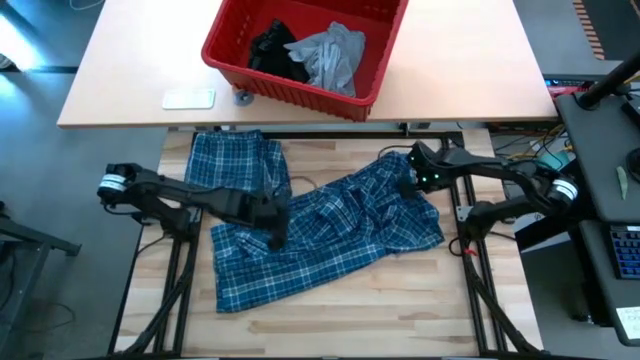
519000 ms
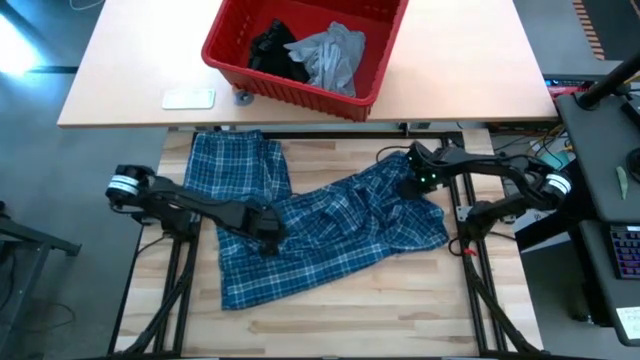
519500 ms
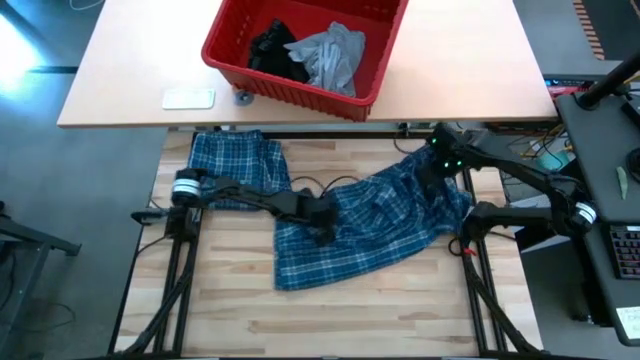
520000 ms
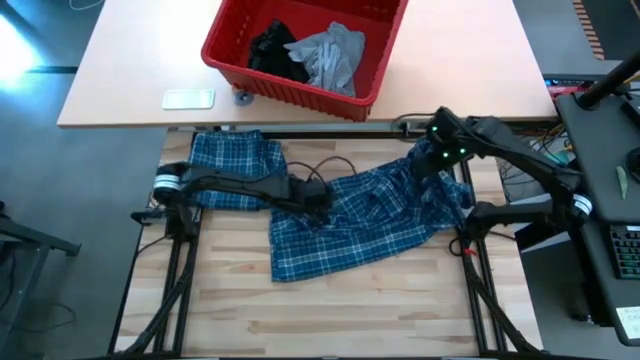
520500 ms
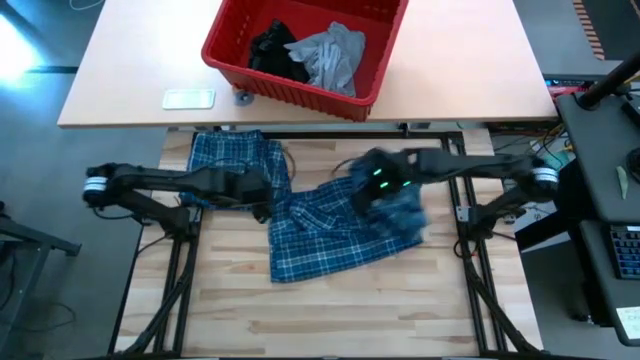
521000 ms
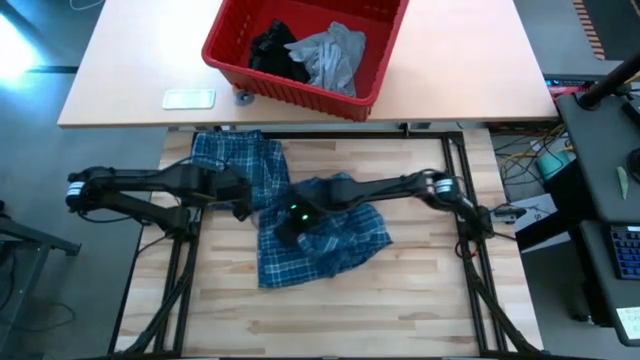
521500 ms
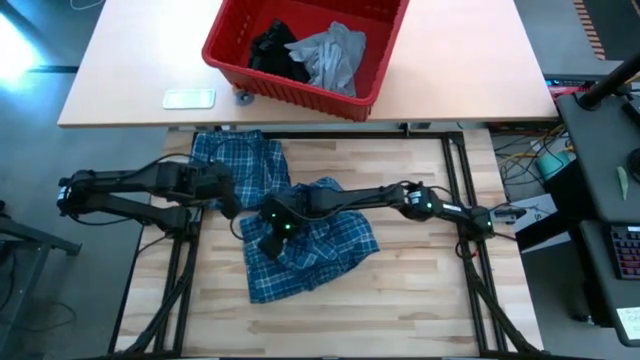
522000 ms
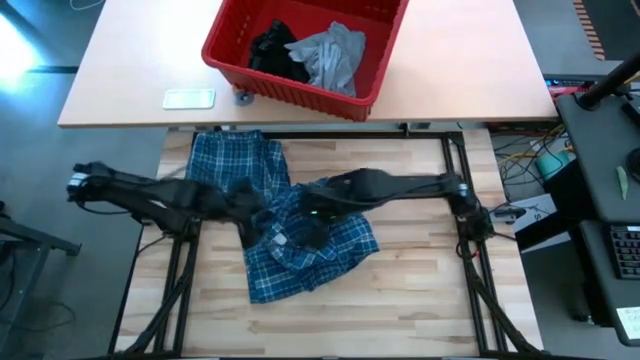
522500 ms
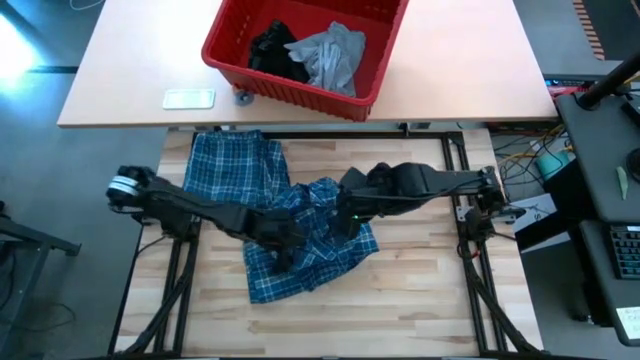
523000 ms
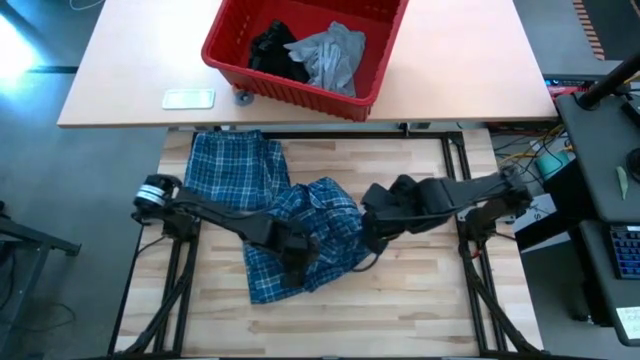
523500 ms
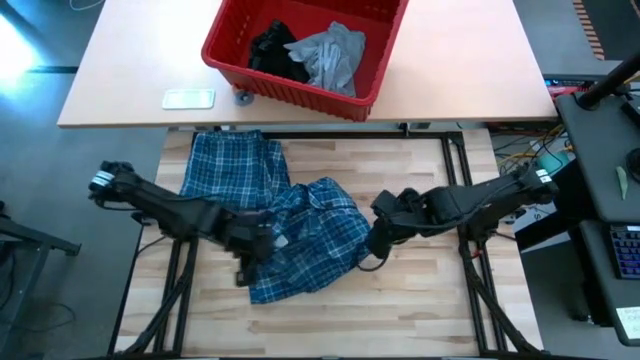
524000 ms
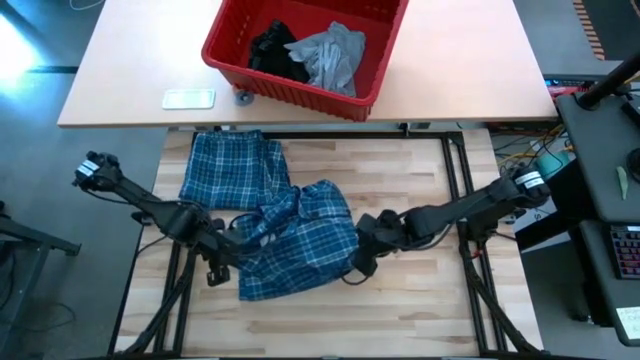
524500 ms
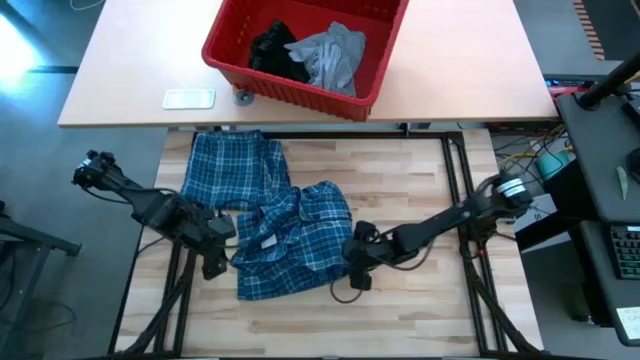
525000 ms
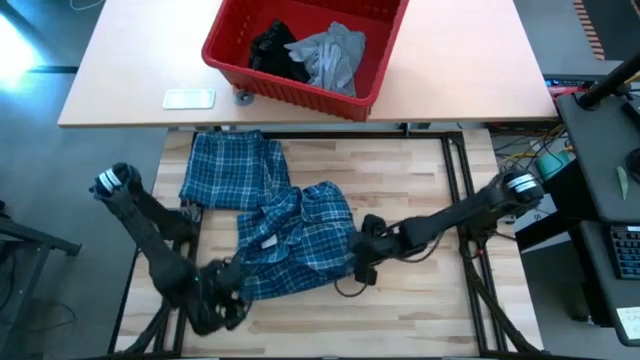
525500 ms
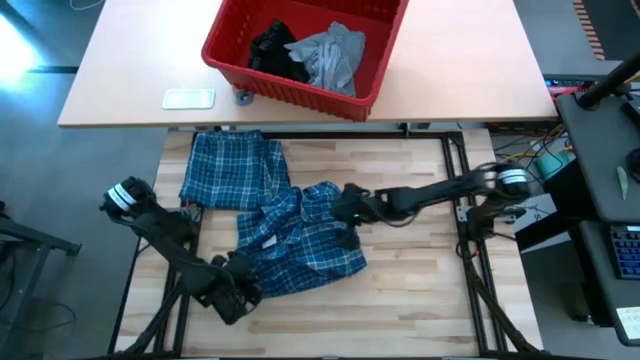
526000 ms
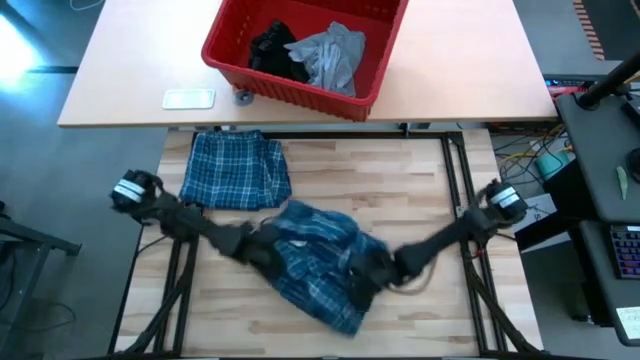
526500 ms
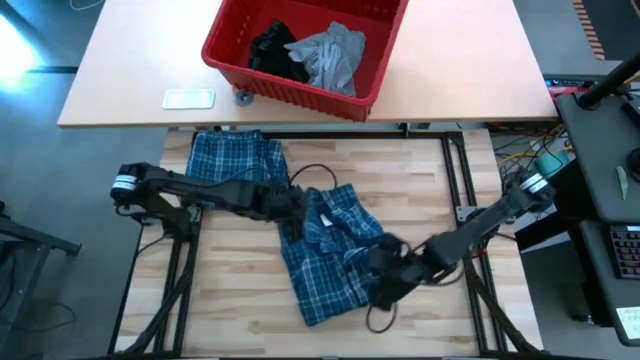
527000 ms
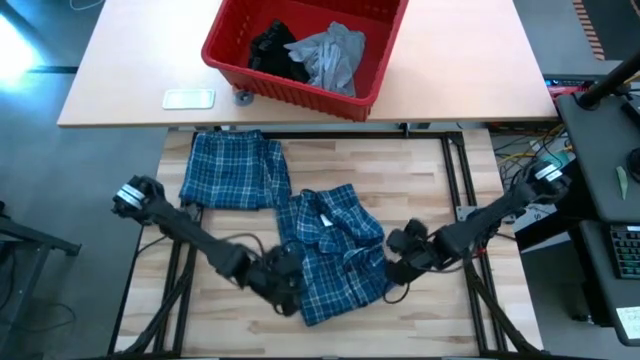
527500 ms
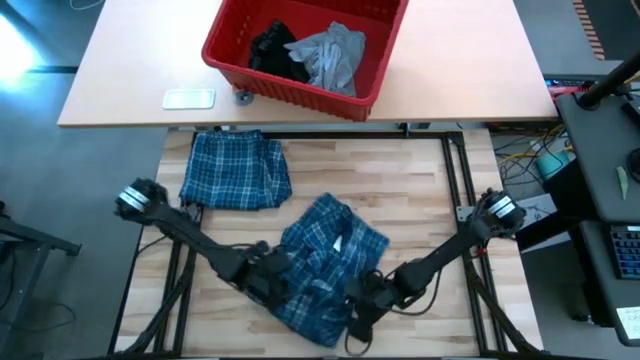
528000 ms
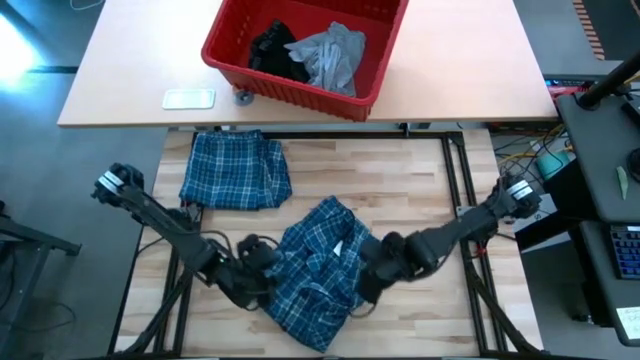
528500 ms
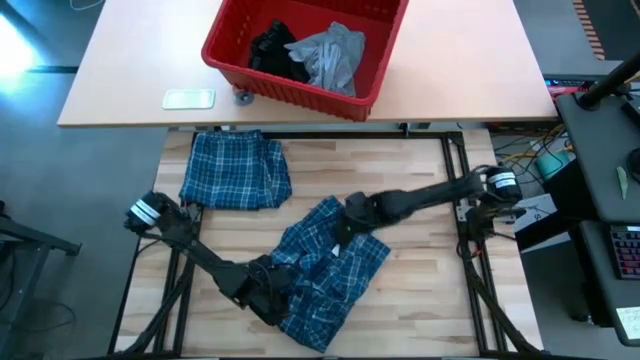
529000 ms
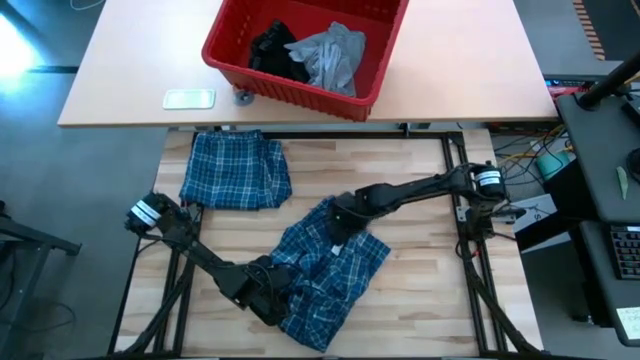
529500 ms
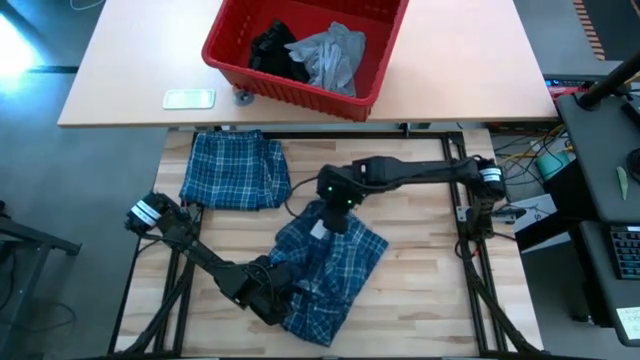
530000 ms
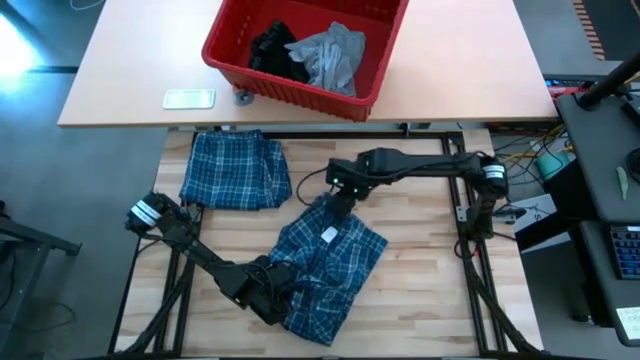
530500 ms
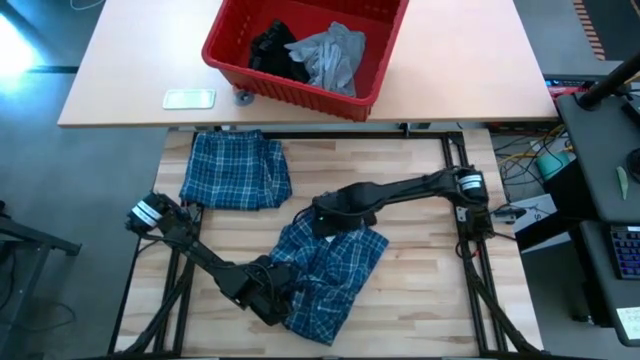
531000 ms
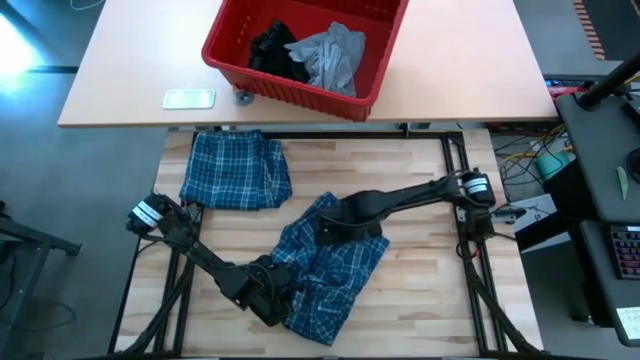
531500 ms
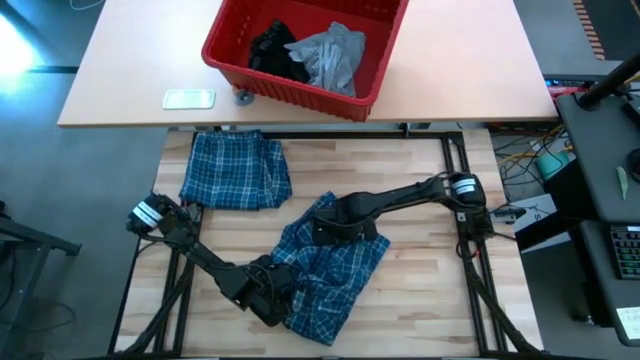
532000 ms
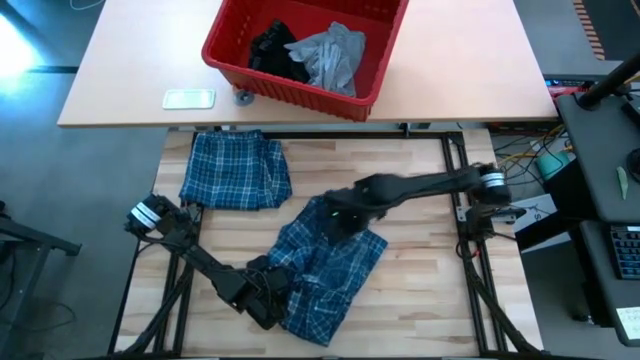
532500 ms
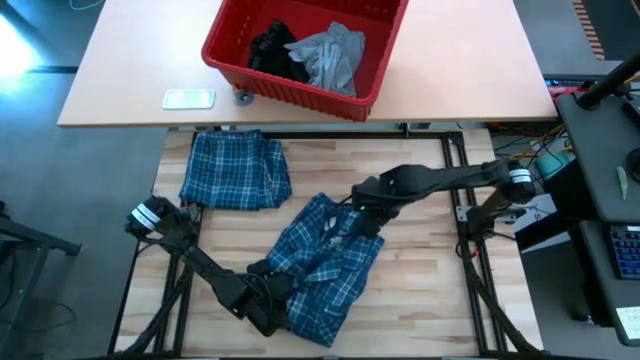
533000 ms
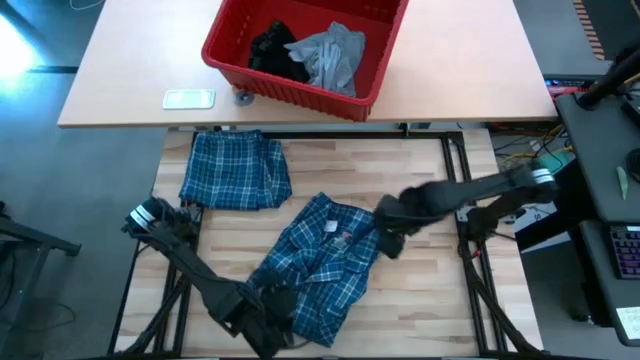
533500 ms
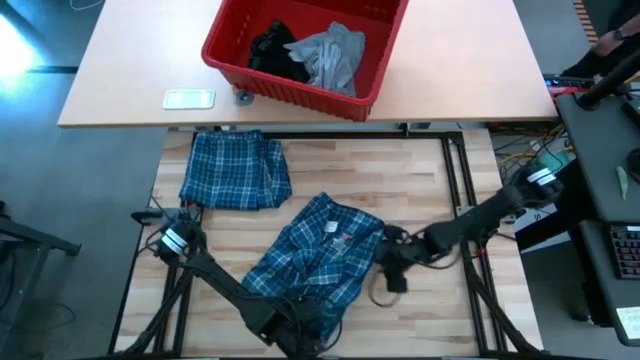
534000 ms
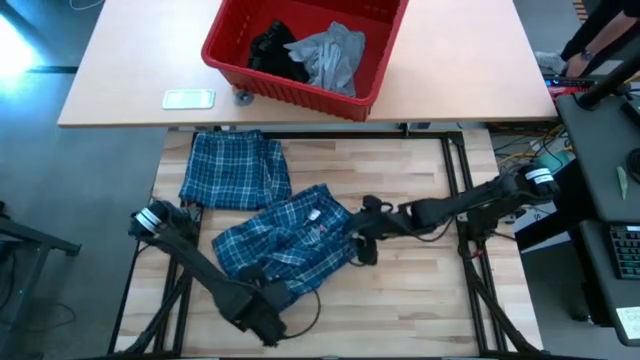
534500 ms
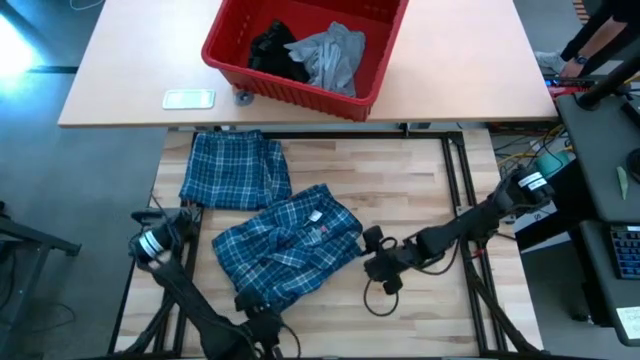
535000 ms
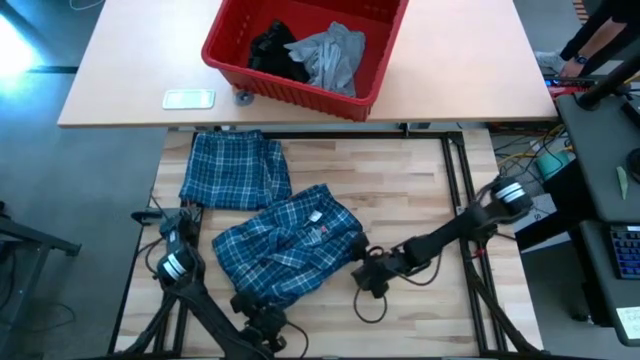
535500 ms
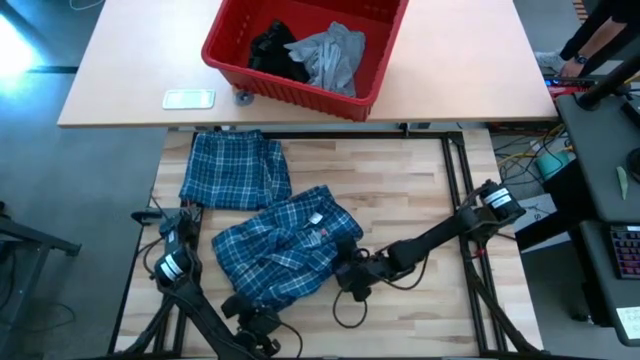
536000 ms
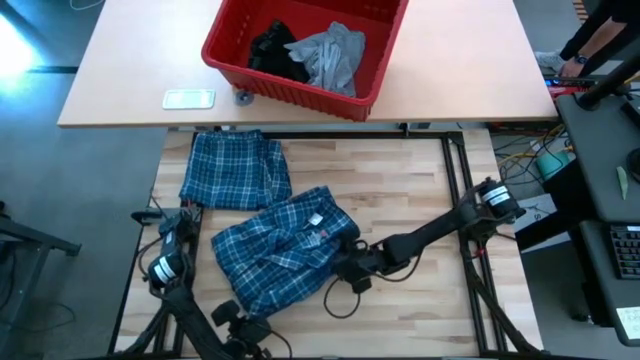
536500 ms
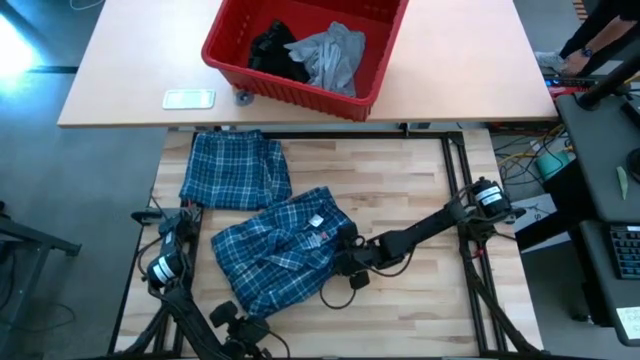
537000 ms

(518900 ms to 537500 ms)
Task: Fold Laundry from Bin
Fold the blue patterned long sleeve shirt

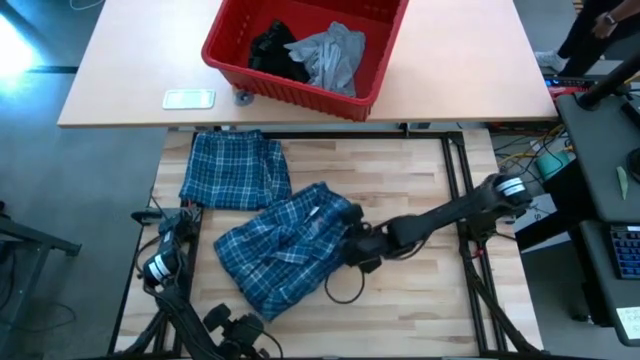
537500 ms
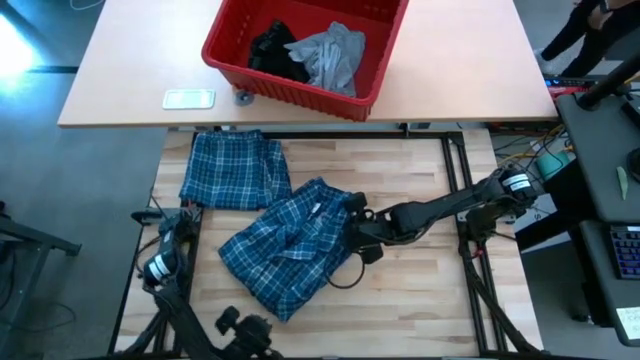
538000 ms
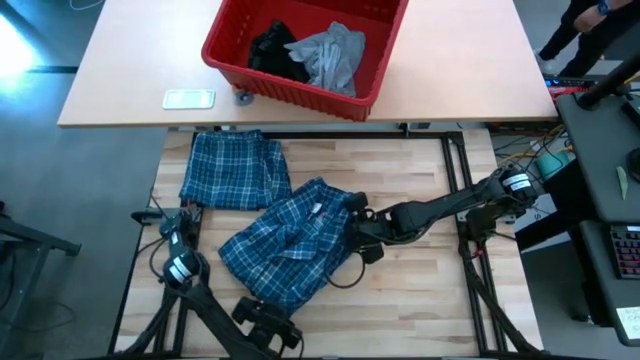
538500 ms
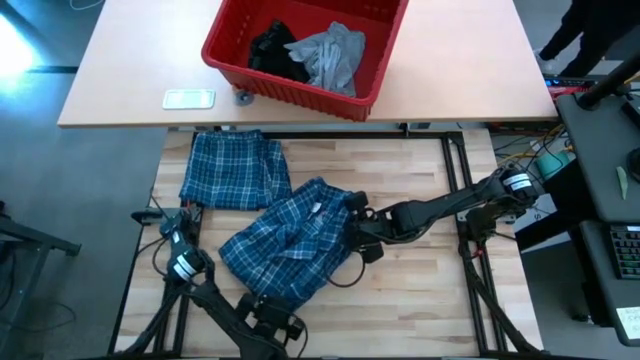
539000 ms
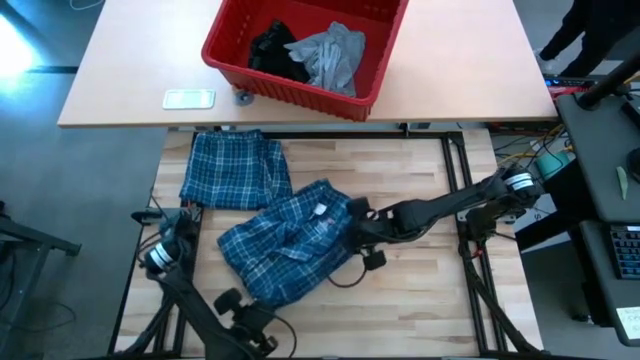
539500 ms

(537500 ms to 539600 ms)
Fold the blue patterned long sleeve shirt
